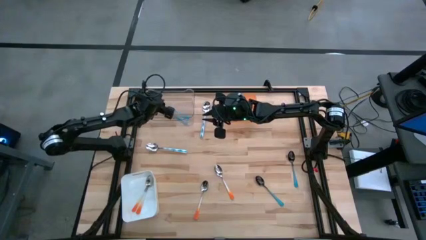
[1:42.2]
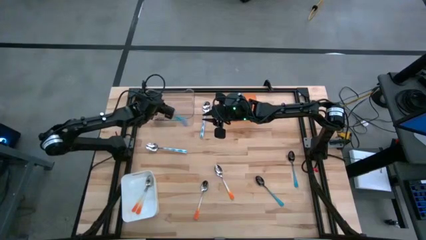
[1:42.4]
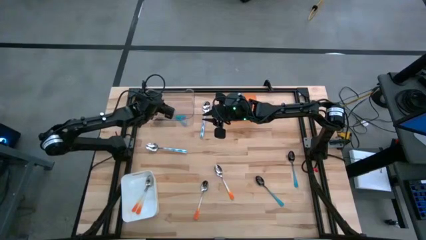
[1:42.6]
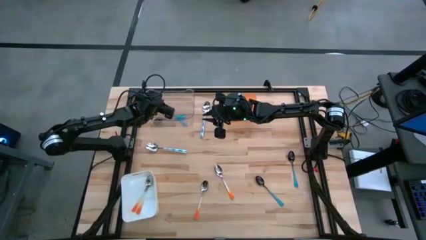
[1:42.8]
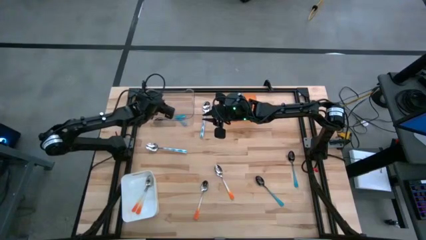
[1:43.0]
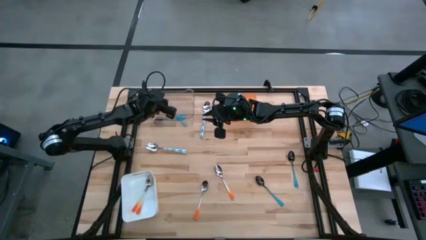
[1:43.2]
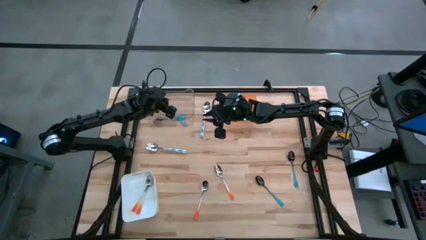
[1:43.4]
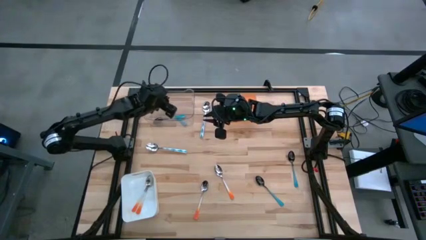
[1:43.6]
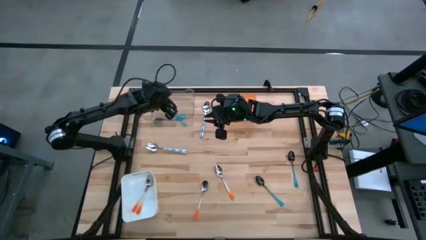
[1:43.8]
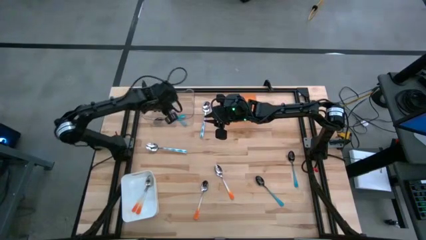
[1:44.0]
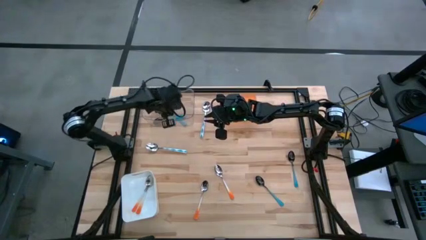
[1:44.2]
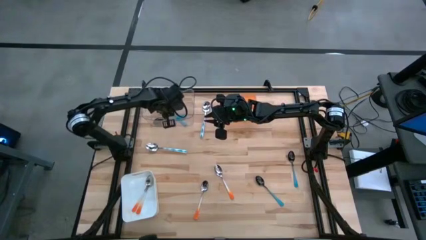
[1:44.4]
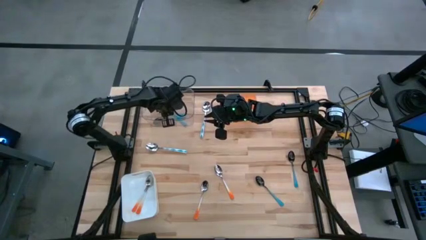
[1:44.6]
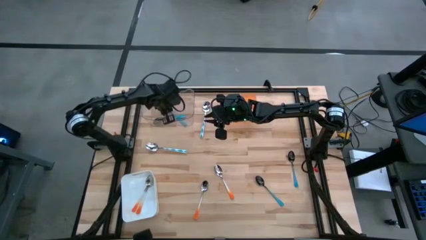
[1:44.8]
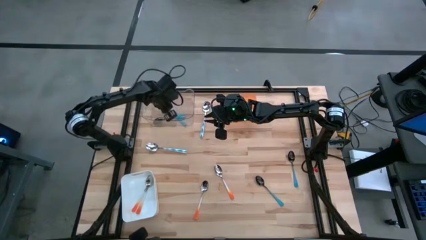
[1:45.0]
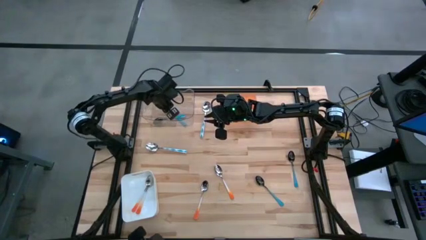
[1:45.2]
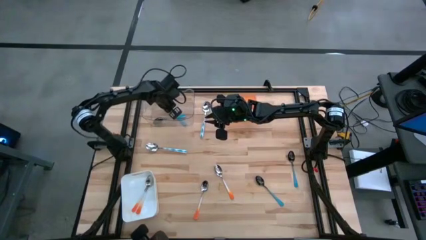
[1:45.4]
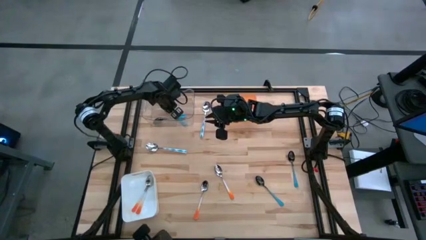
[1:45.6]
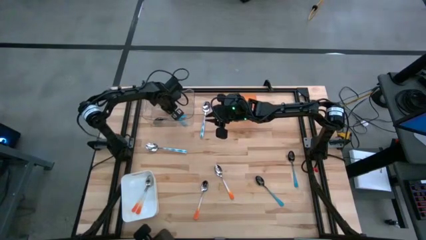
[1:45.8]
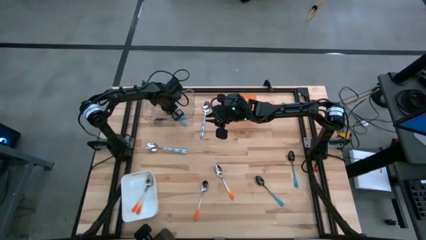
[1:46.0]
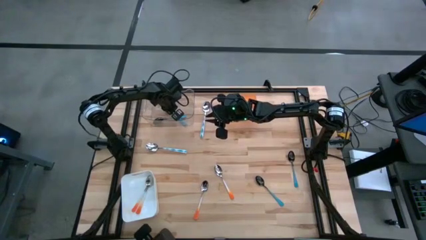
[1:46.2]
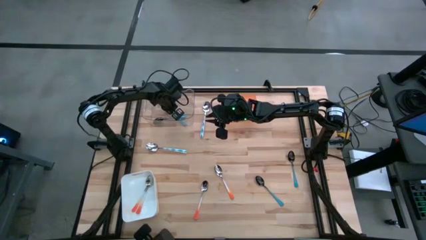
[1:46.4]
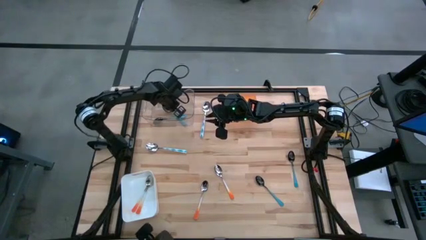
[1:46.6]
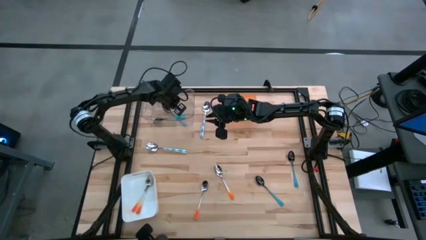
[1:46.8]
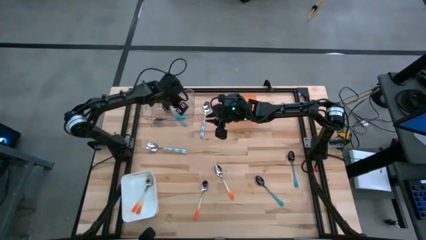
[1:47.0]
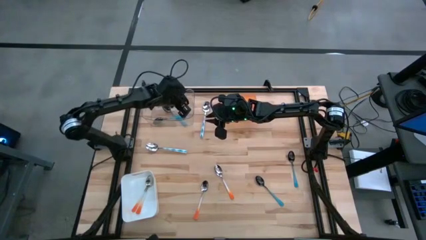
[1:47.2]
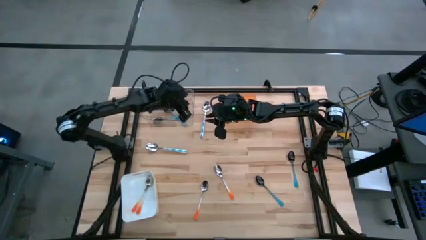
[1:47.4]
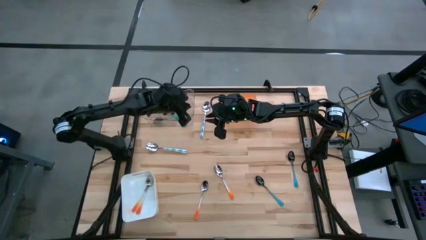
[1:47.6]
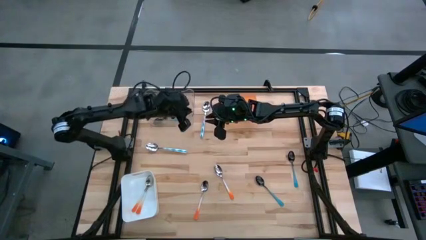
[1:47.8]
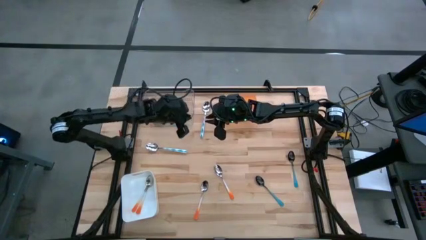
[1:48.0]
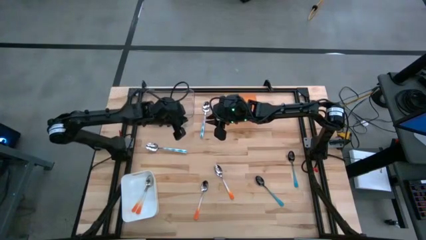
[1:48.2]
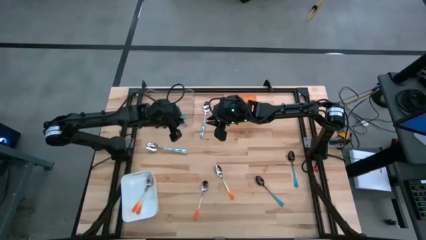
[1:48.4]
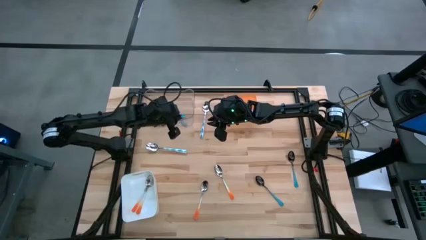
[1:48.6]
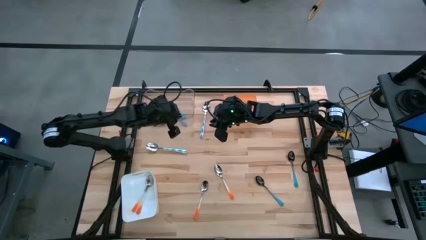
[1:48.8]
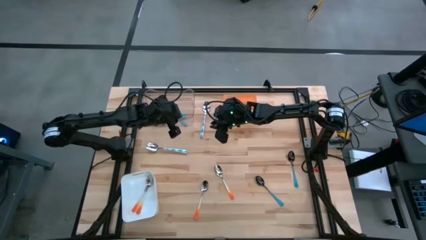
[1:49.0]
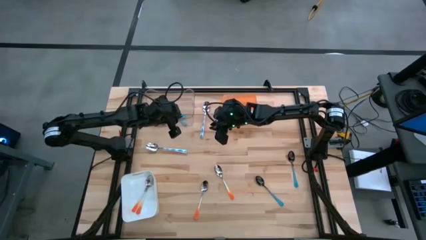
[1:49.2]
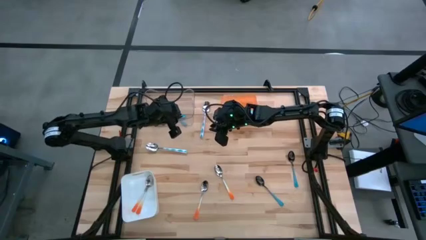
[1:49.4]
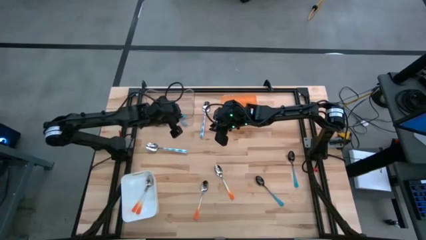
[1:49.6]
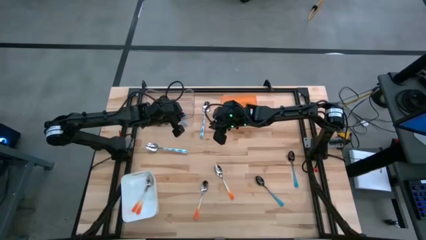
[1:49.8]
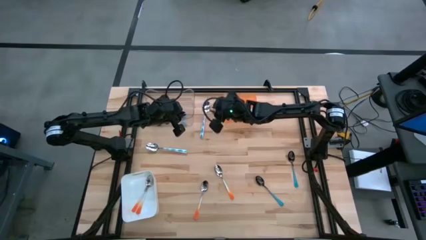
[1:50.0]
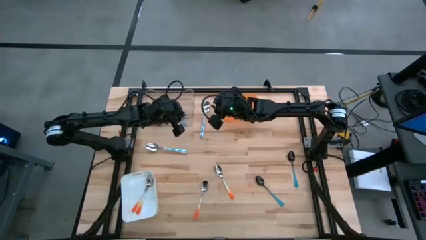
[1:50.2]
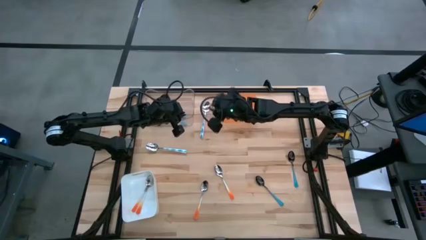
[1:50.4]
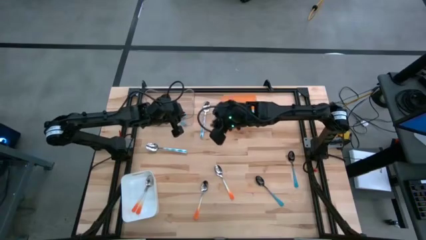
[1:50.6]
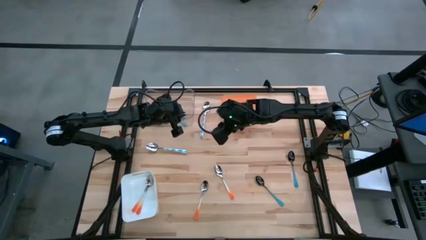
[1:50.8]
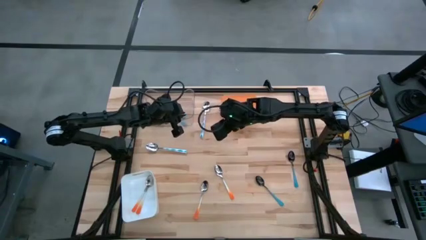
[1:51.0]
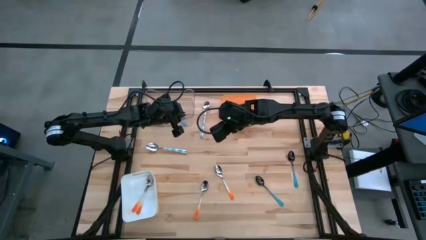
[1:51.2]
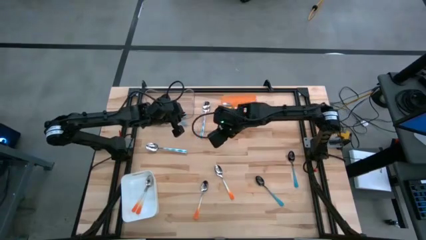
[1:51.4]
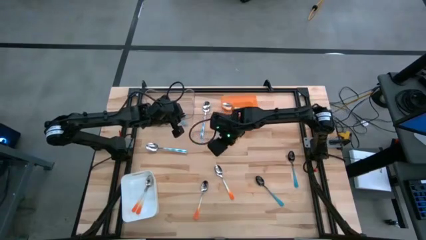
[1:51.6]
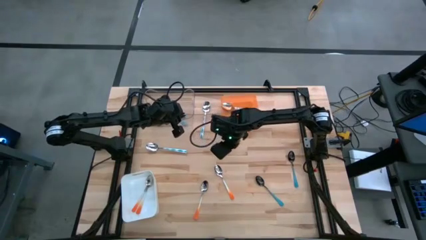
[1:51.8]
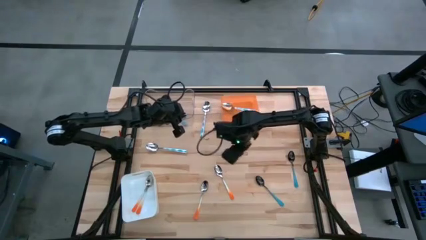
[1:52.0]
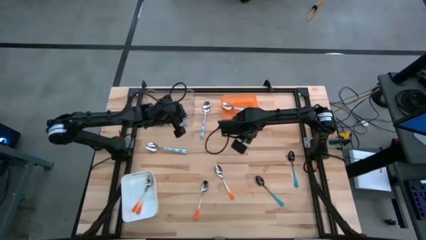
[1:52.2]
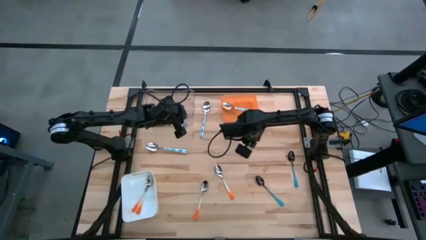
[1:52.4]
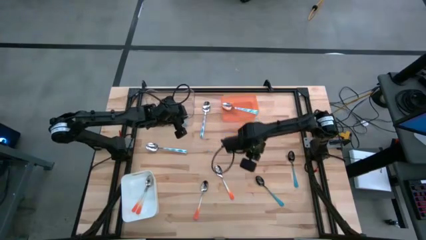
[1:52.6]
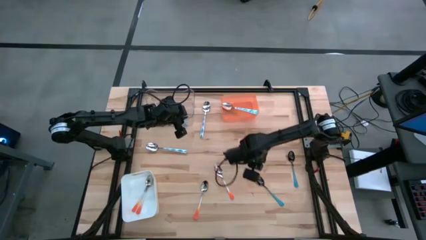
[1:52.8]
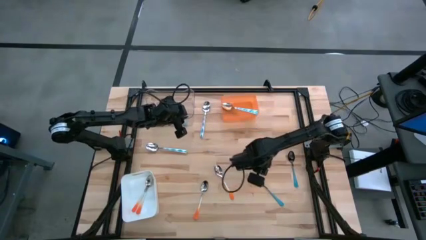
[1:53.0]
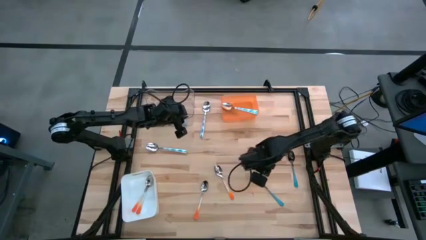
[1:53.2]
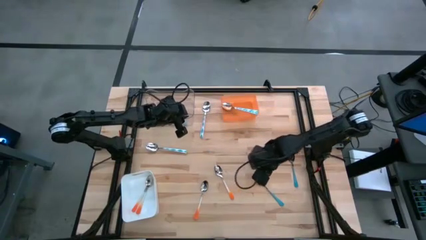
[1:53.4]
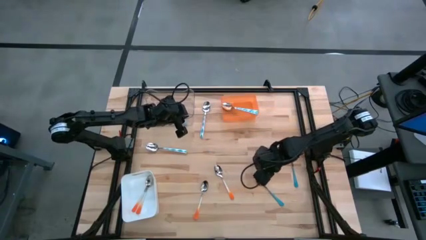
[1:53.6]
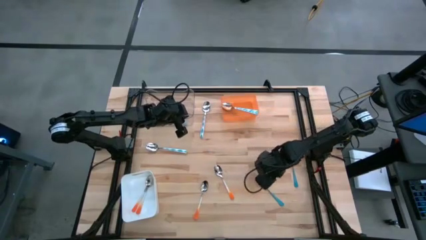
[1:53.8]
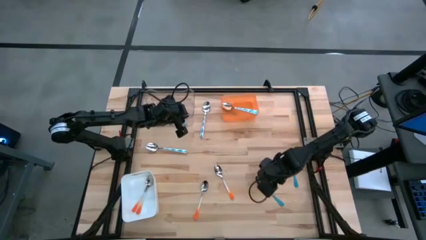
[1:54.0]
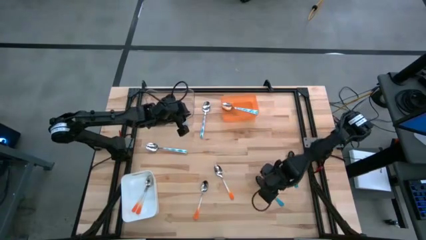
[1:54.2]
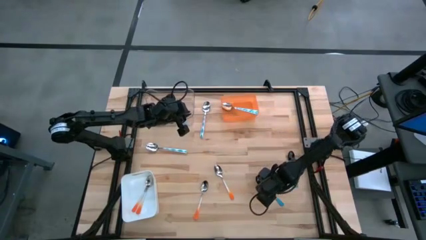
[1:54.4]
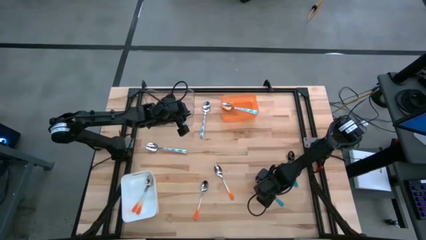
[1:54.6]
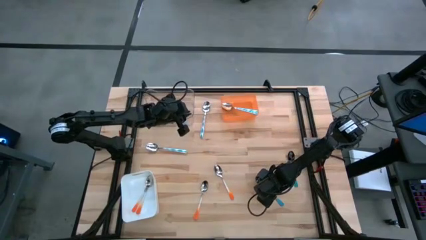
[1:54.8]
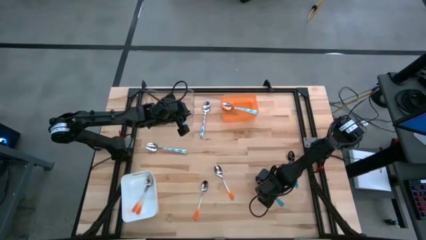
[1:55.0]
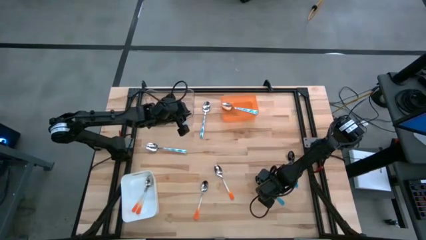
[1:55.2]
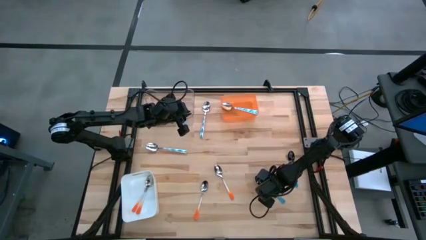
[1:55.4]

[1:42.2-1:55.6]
Task: Sort silverware by color (type)
Put the blue spoon into the transparent bin

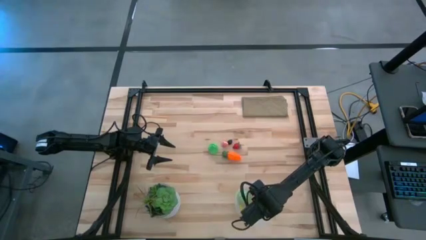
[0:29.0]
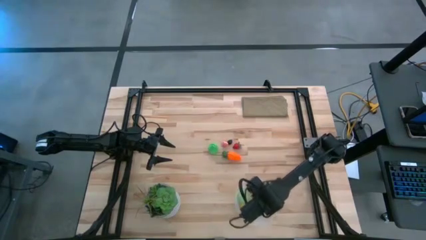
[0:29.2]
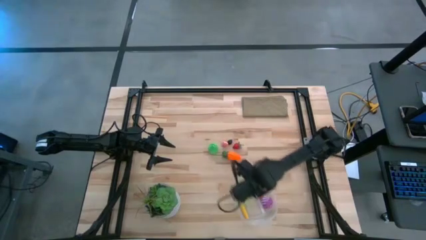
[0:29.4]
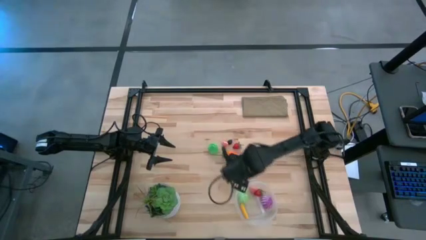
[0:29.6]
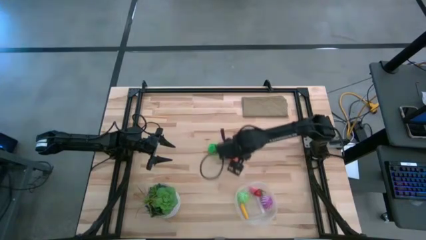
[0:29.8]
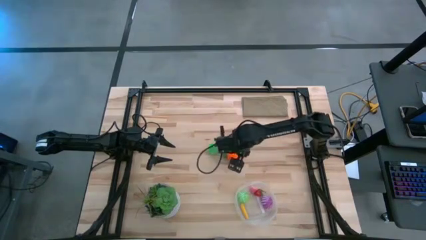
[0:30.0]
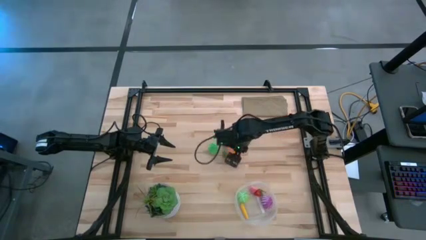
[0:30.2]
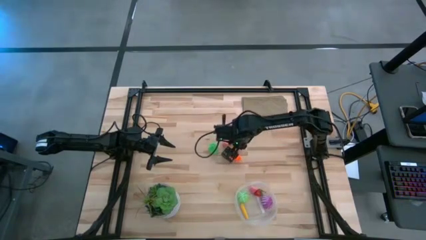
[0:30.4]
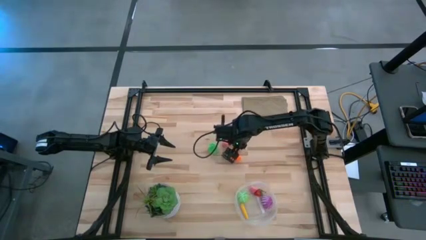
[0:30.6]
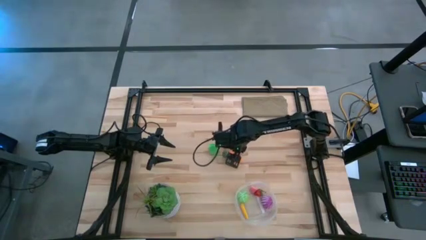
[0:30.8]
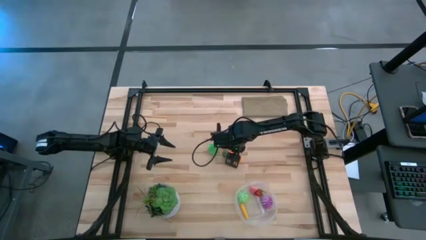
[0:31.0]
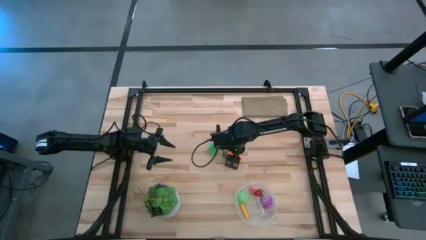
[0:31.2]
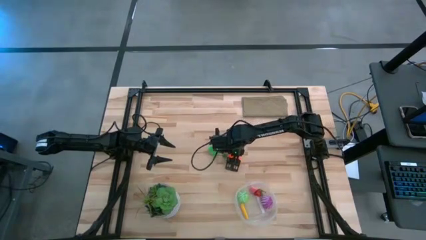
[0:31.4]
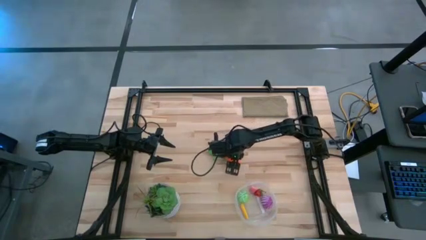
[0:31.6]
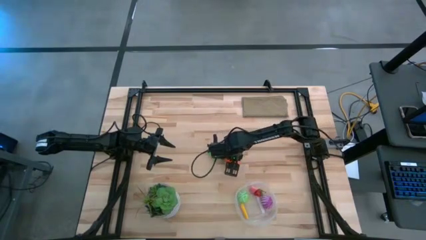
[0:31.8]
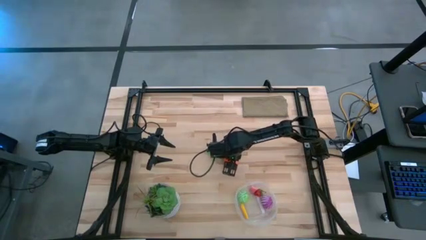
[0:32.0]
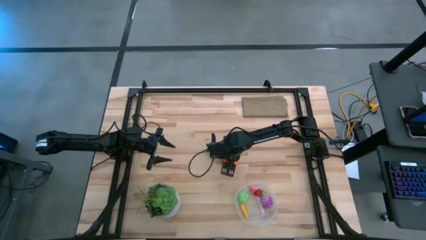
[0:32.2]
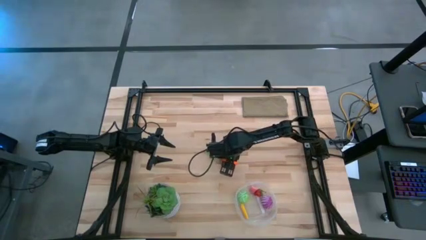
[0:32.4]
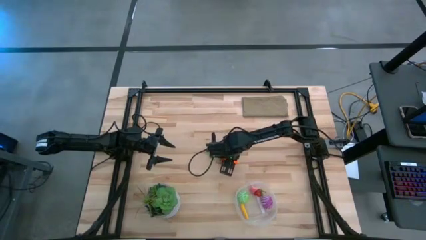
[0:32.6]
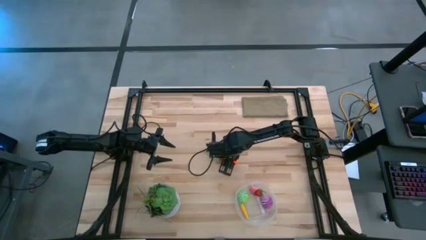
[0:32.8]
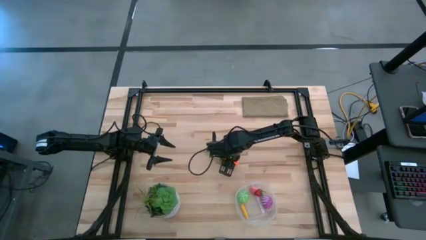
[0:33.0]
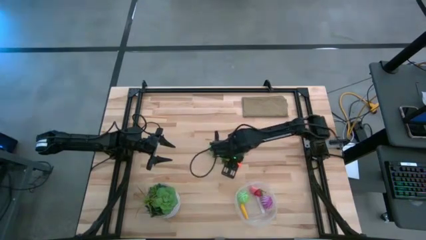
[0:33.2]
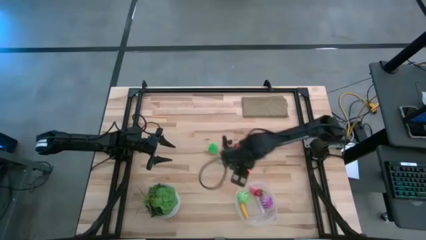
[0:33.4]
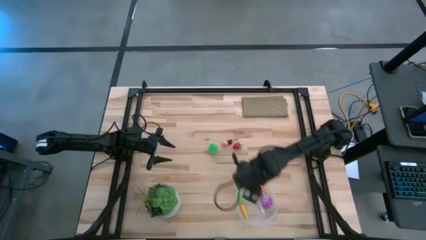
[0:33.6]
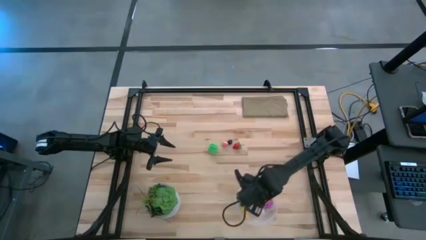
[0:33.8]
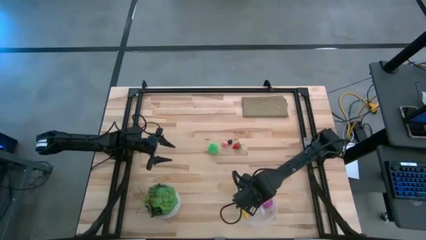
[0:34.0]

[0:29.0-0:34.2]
Task: Pick and placing Produce into tupperware
Put the orange carrot into the transparent container
